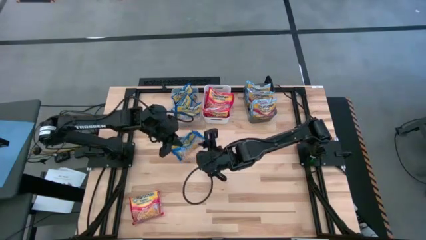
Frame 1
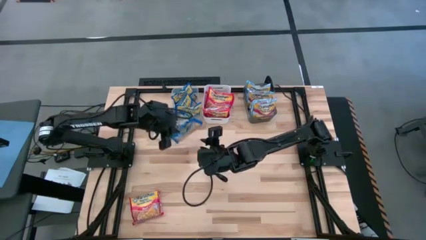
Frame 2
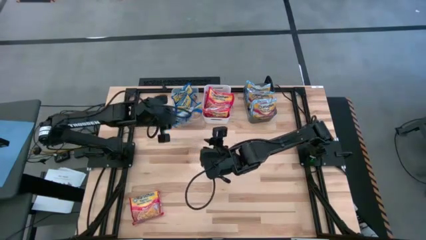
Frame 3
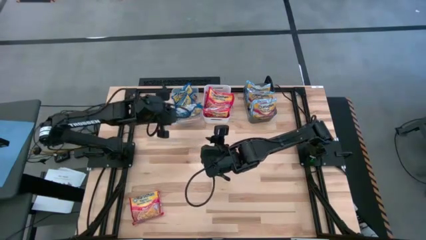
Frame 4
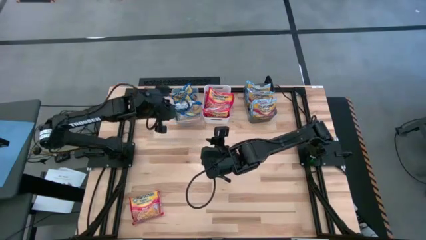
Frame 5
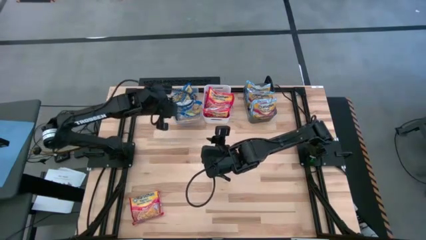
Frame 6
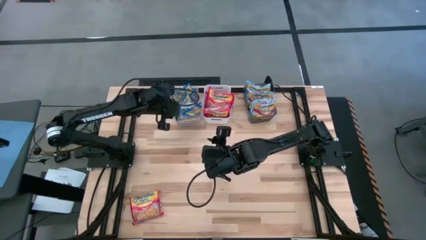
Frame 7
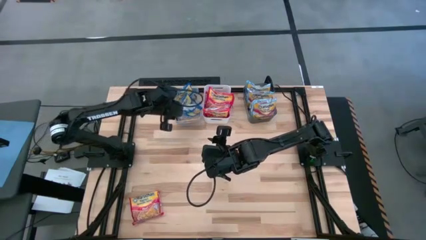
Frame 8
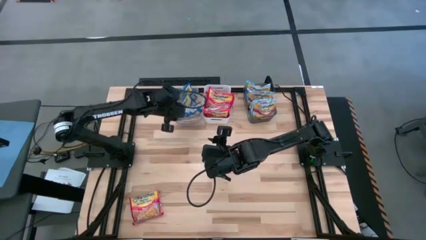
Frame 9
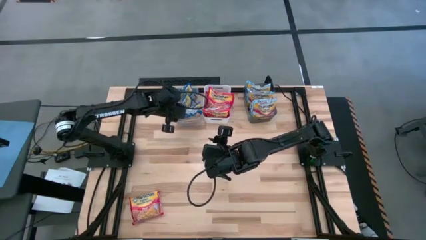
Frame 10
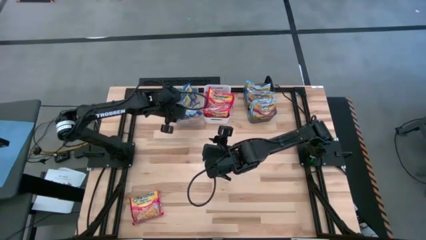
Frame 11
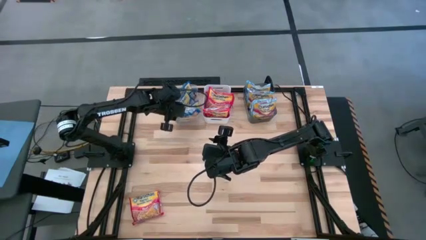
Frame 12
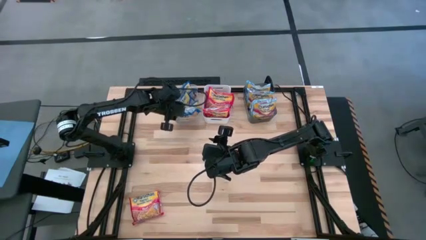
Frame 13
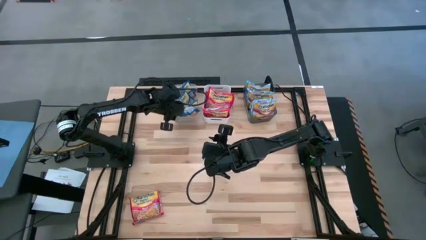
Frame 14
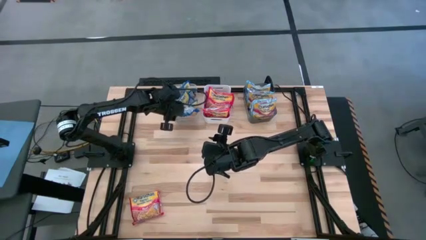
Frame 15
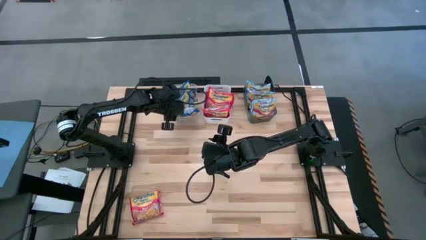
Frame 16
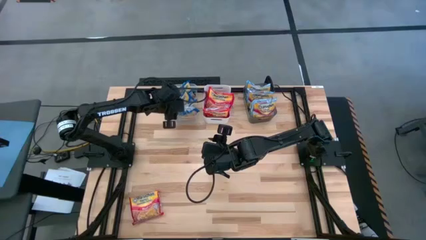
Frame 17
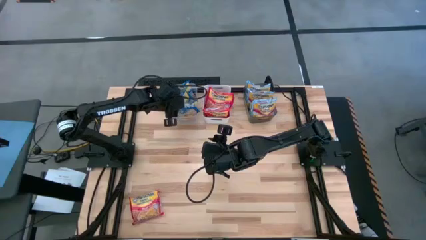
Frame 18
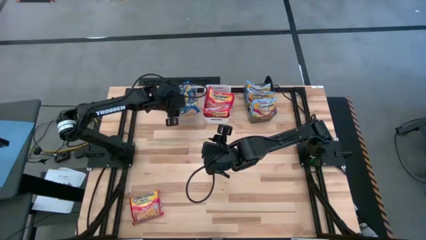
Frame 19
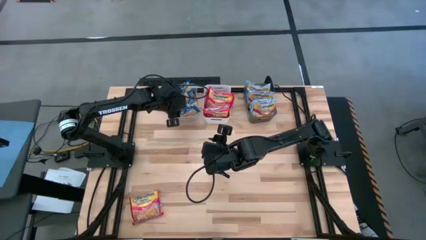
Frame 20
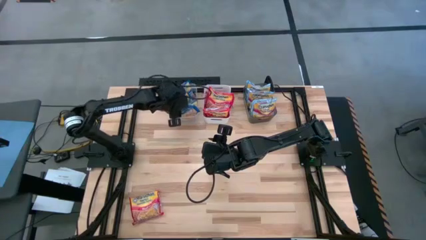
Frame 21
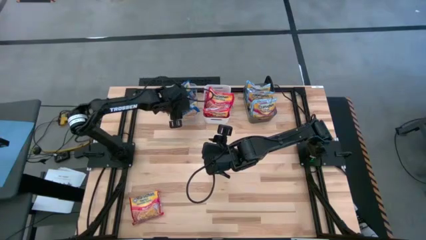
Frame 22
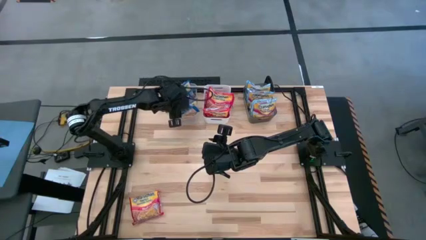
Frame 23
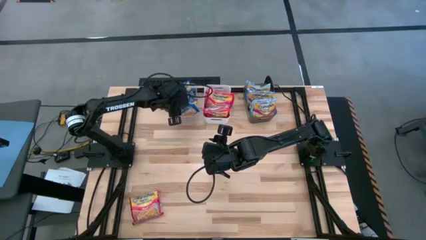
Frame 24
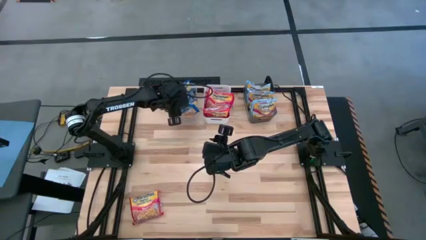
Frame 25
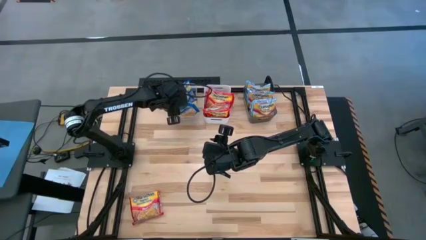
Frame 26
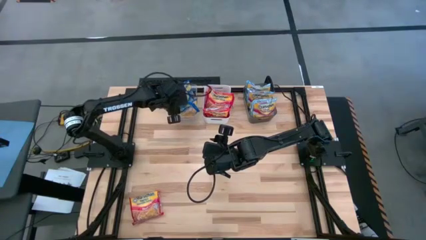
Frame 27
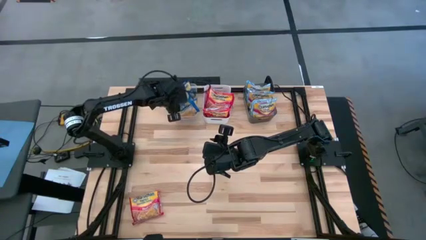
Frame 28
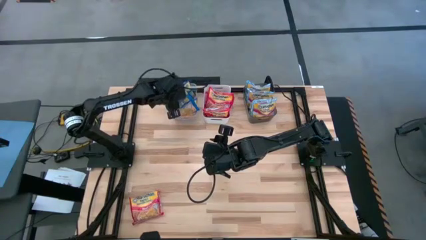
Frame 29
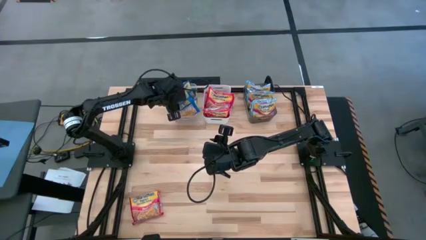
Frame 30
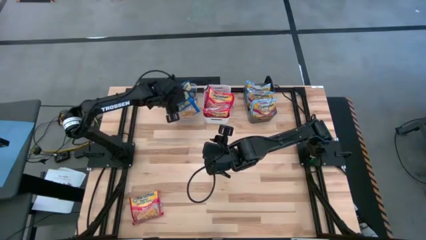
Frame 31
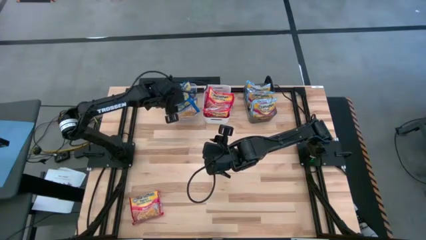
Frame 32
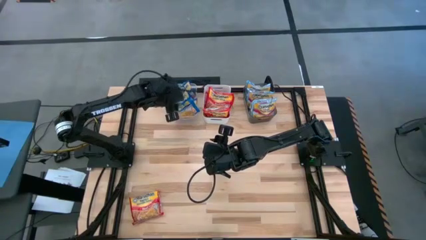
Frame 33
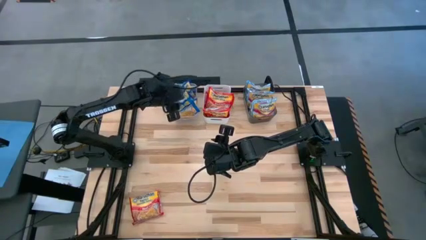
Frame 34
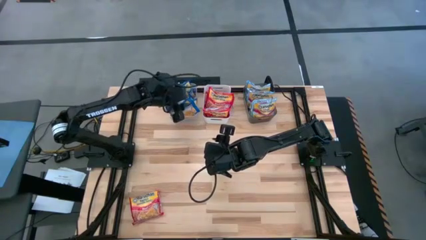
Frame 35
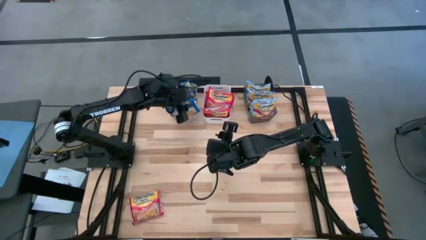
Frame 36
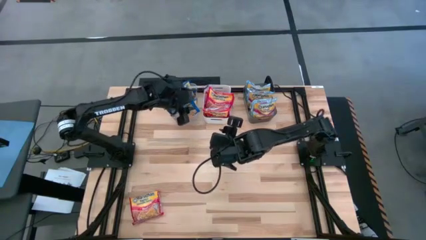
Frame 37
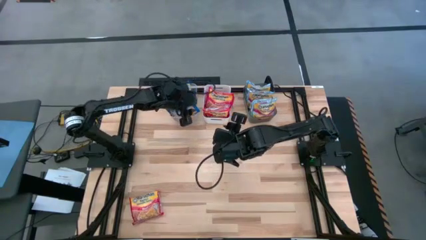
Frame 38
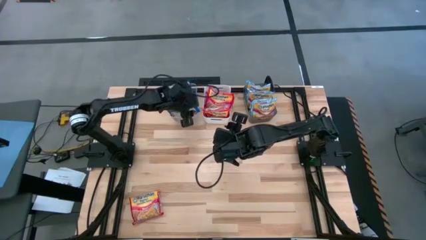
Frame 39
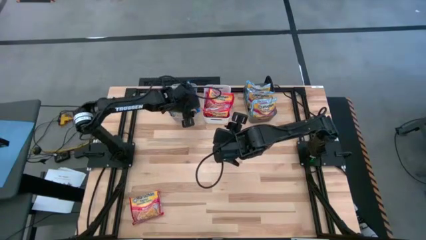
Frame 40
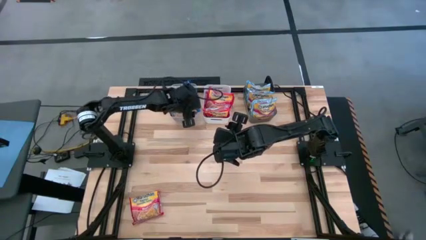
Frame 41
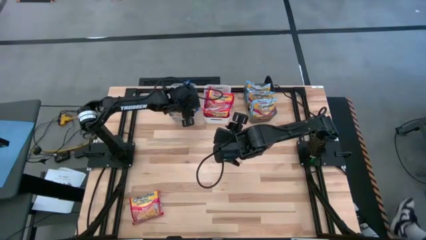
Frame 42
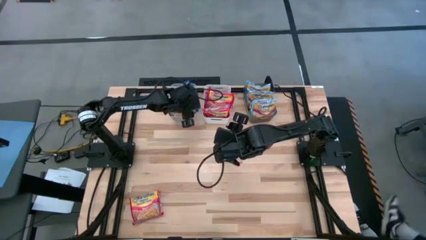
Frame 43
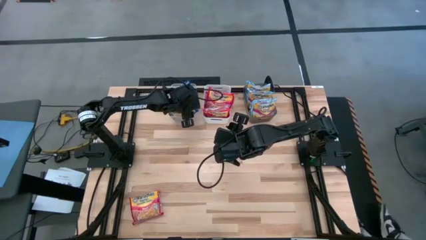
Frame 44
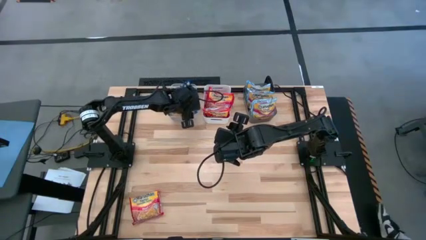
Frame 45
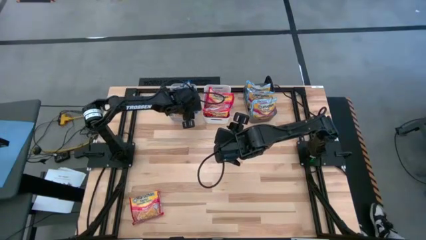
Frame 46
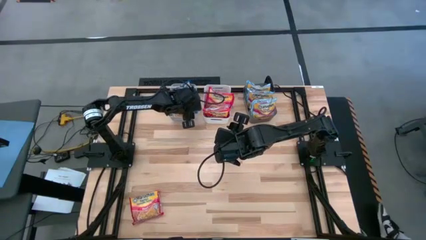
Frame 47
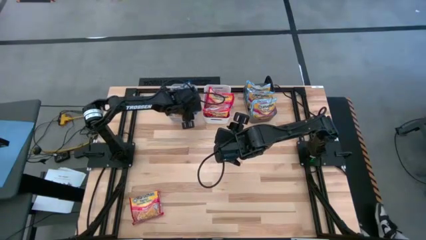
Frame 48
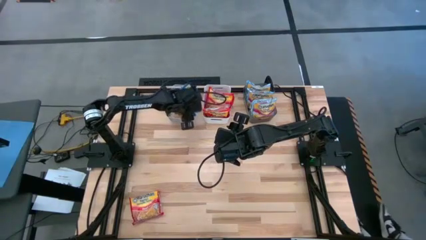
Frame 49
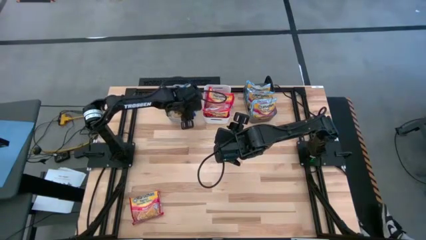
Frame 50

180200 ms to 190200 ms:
Task: Sort Maruchan noodles
Put the blue noodle pack into the transparent bin

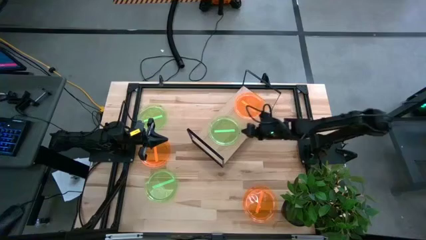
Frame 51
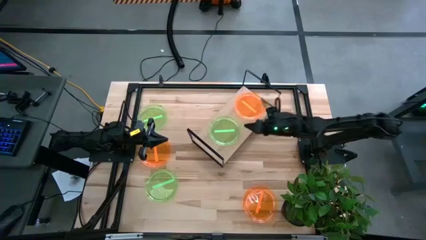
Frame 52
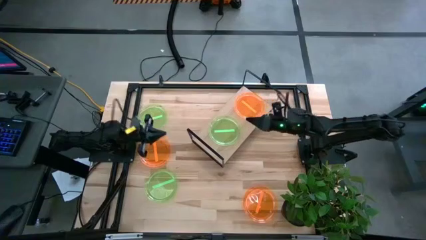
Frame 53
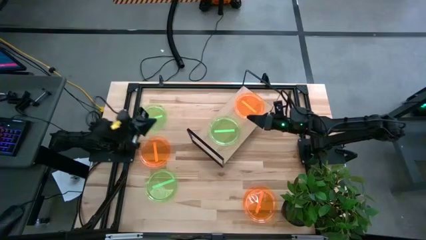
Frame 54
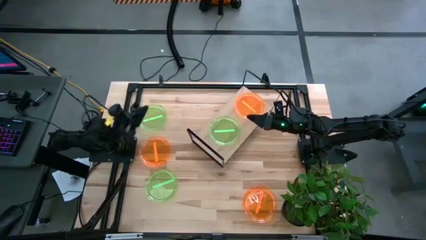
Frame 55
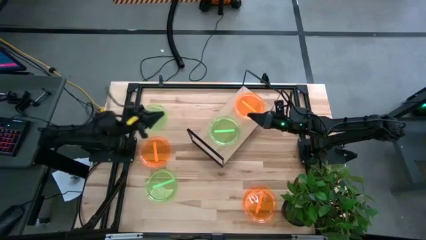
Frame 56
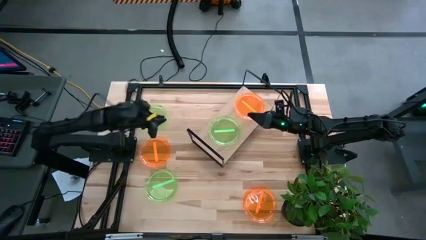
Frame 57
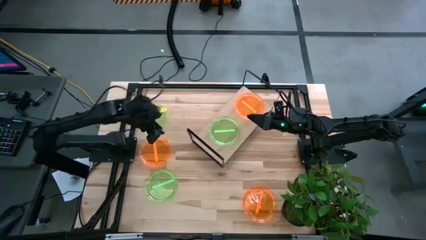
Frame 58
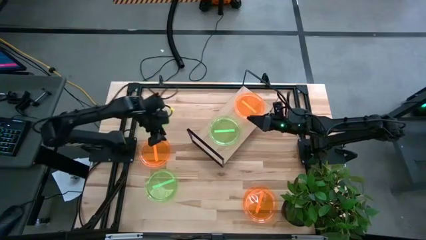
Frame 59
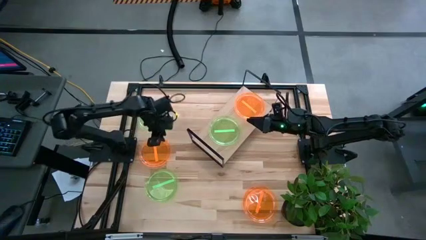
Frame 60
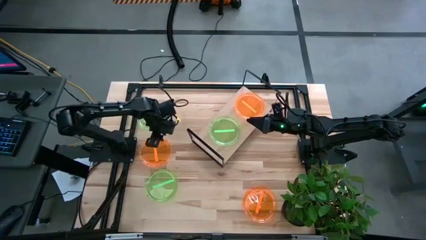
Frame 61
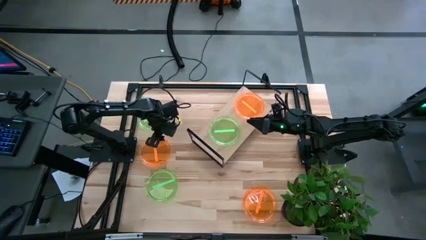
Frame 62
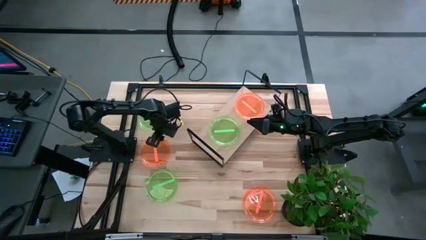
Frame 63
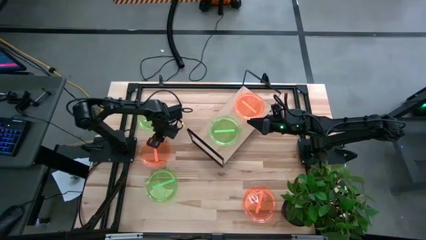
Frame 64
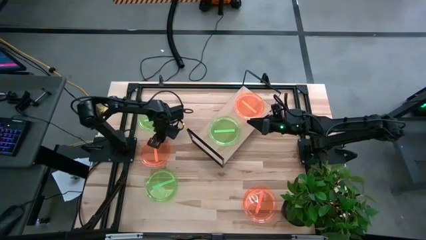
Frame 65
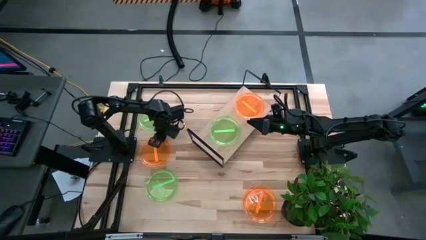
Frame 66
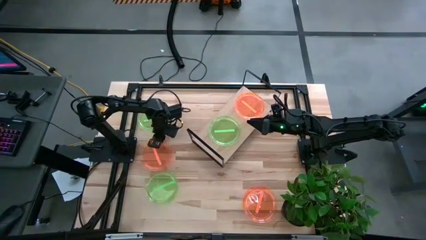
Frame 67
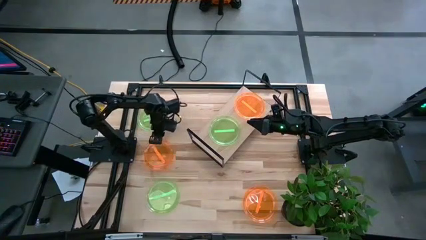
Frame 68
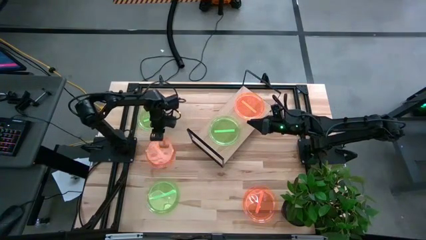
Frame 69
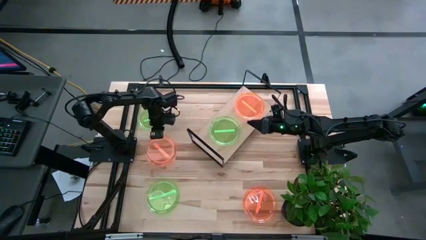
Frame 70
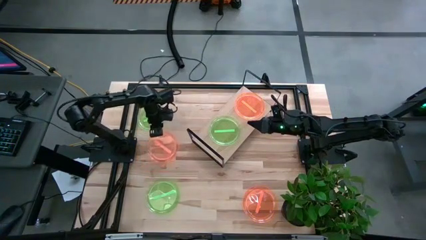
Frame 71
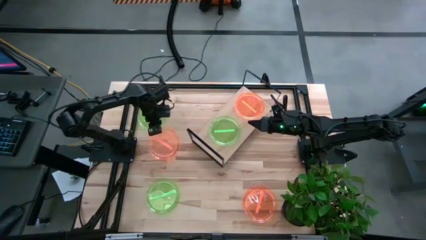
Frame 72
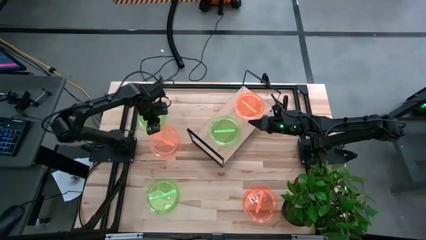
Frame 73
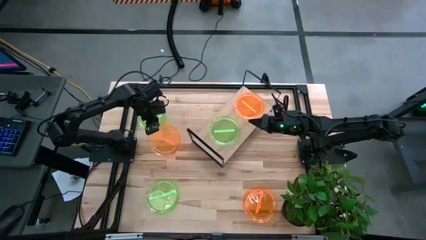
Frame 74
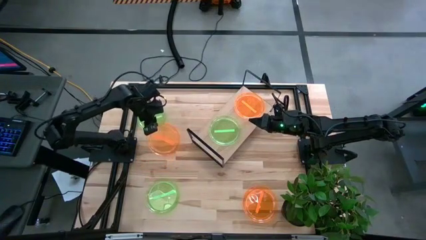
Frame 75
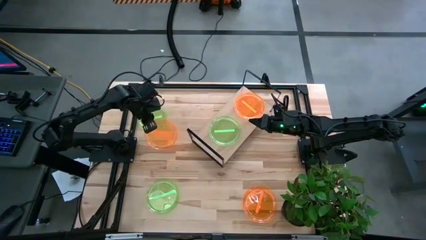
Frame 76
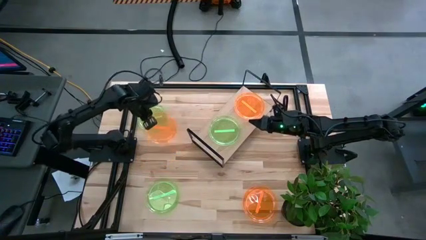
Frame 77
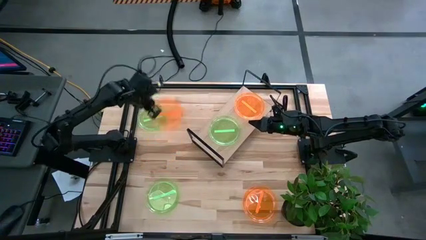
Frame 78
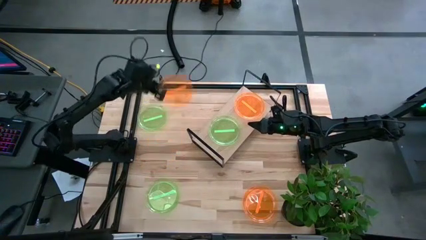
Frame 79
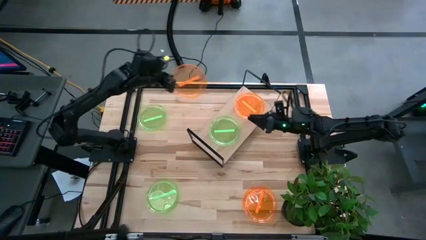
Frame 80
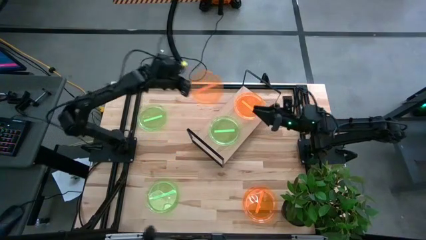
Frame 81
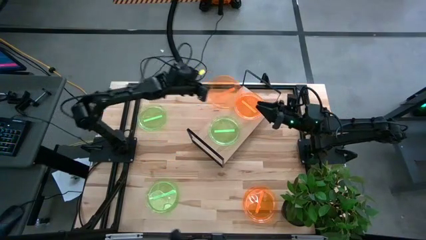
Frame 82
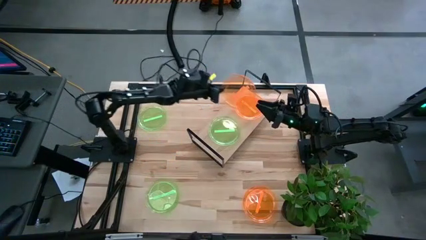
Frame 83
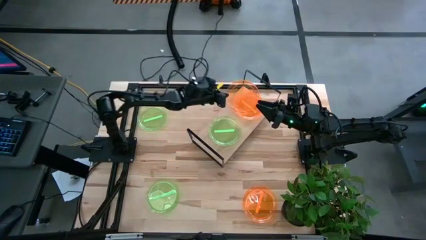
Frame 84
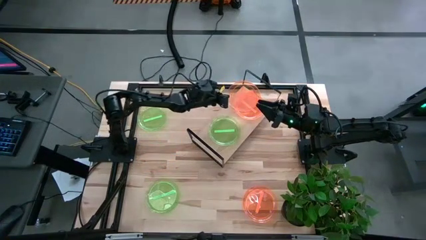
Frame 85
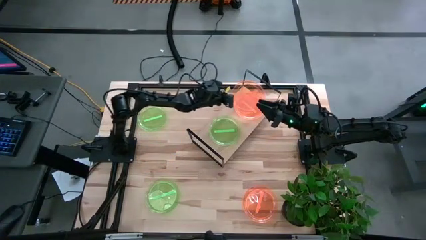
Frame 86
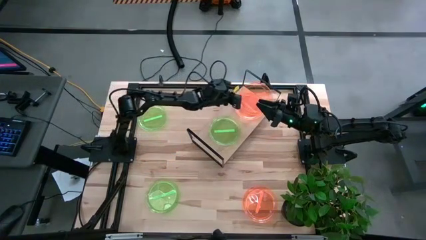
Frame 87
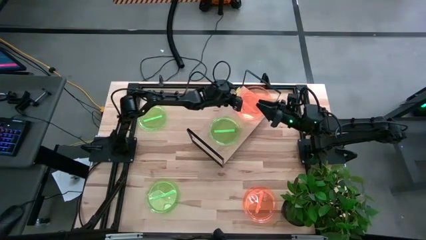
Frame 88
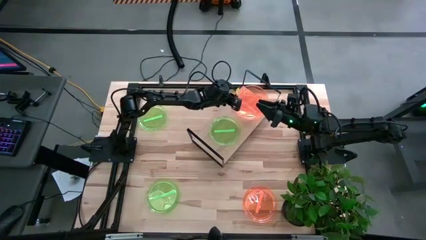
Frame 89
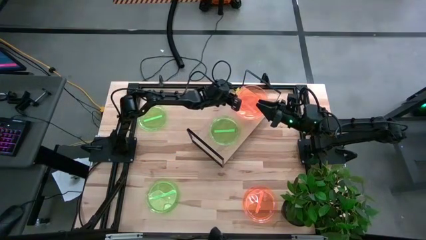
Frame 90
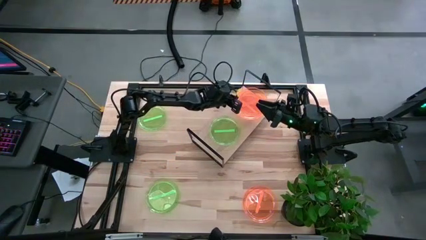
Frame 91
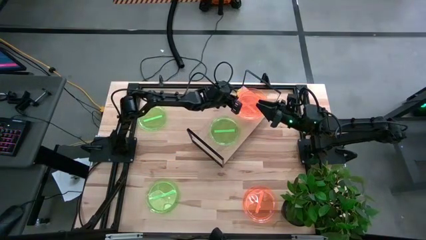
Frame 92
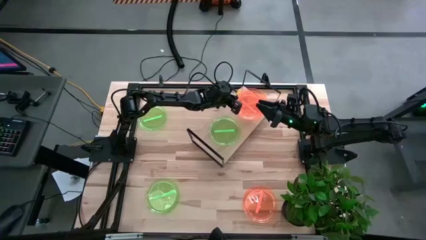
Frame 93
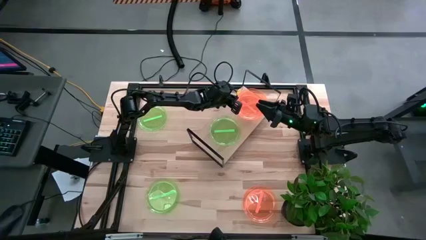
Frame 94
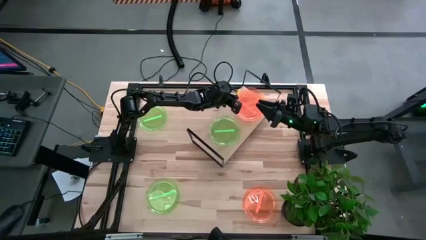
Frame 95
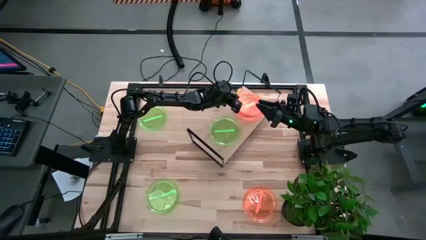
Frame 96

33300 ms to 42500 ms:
Task: Place and stack plates onto a shelf
Stack the left orange plate on top of the orange plate on the shelf
